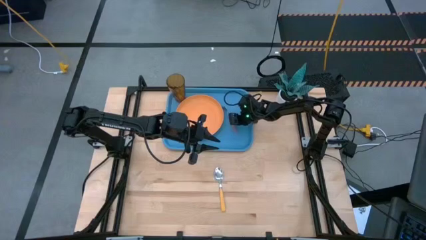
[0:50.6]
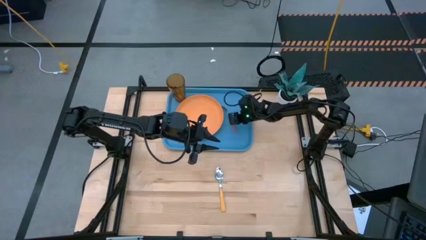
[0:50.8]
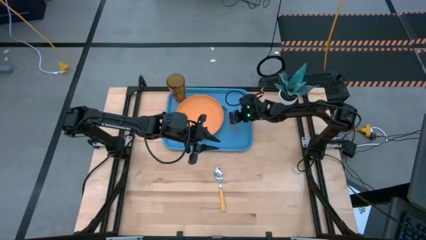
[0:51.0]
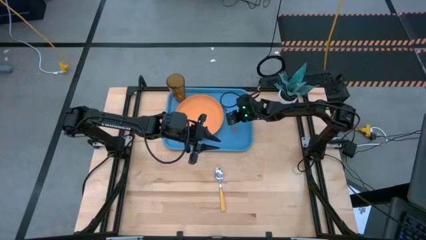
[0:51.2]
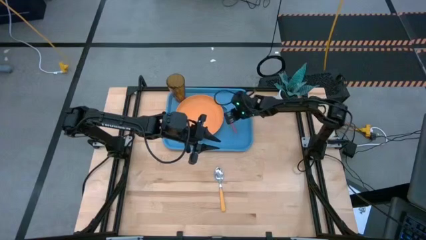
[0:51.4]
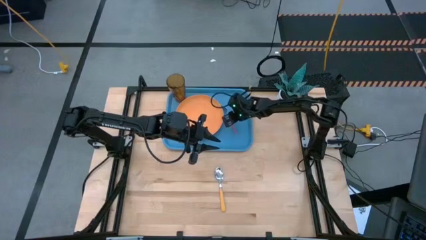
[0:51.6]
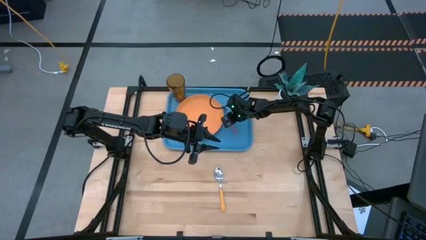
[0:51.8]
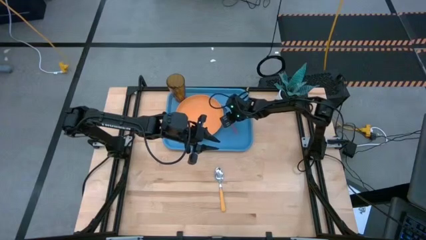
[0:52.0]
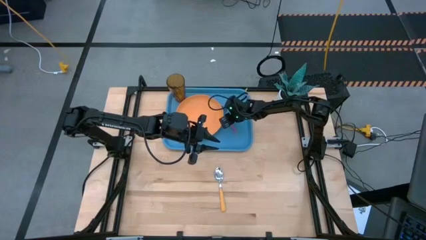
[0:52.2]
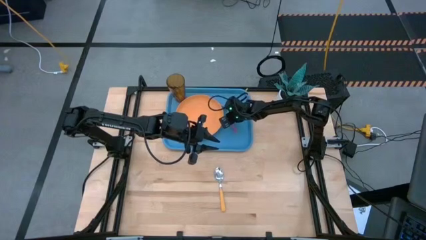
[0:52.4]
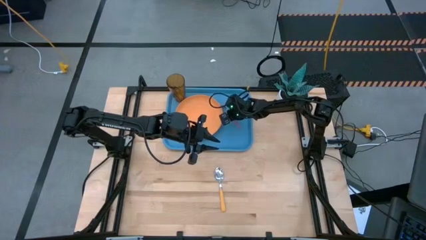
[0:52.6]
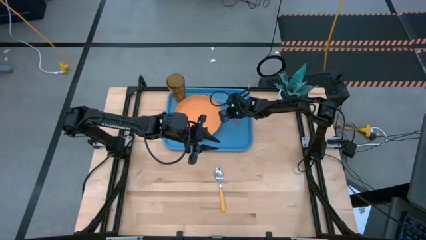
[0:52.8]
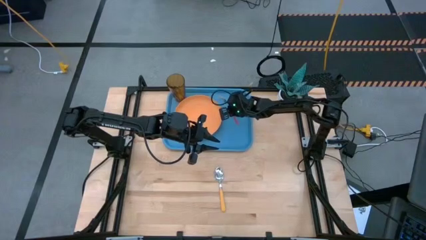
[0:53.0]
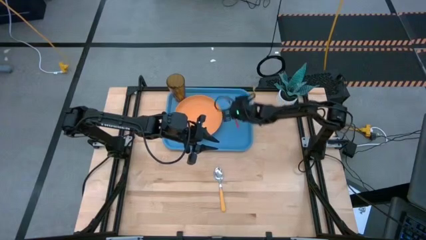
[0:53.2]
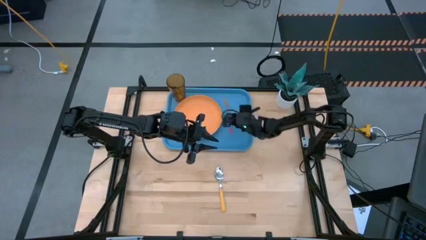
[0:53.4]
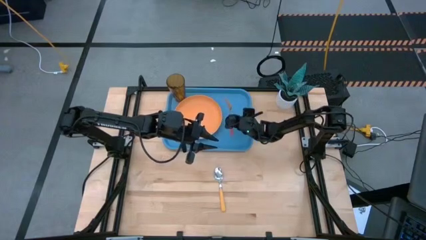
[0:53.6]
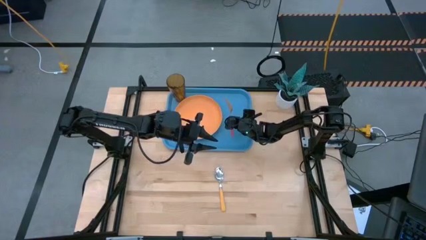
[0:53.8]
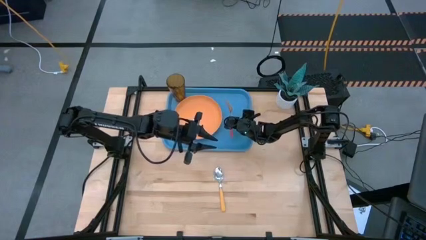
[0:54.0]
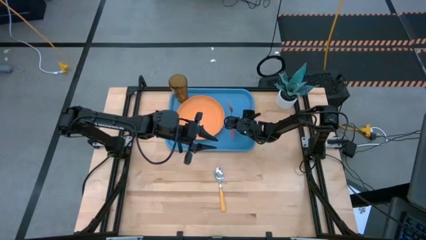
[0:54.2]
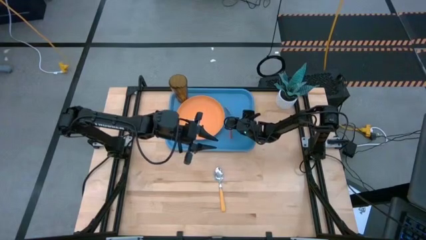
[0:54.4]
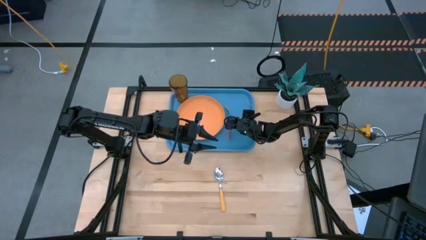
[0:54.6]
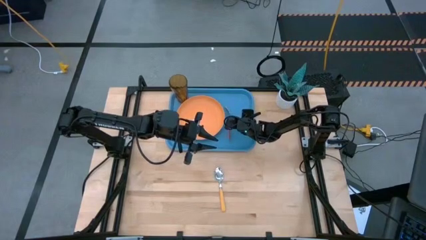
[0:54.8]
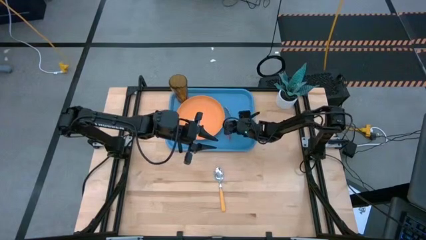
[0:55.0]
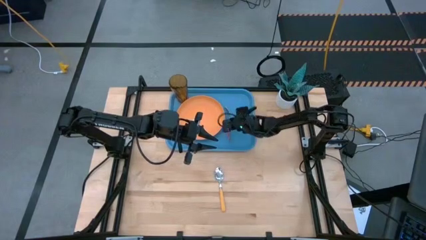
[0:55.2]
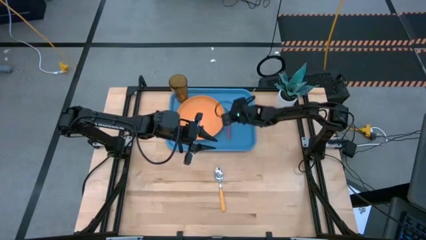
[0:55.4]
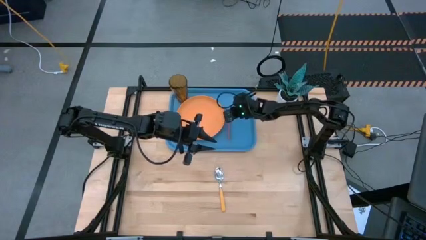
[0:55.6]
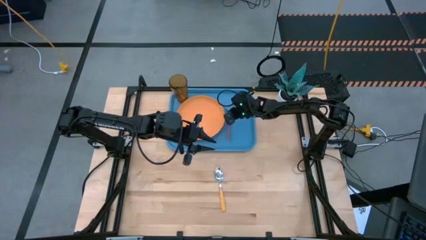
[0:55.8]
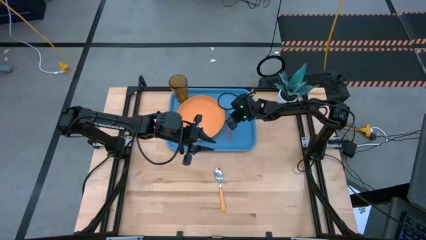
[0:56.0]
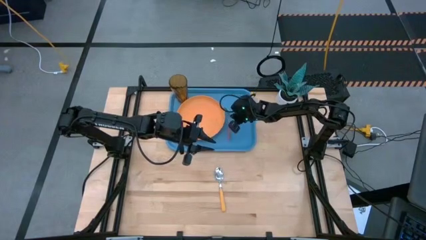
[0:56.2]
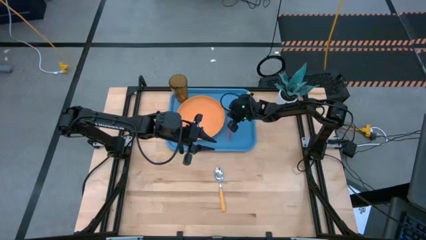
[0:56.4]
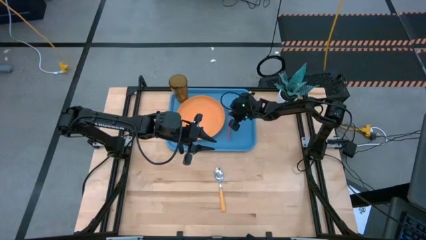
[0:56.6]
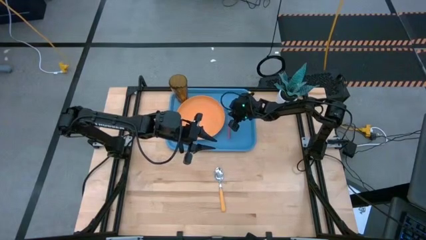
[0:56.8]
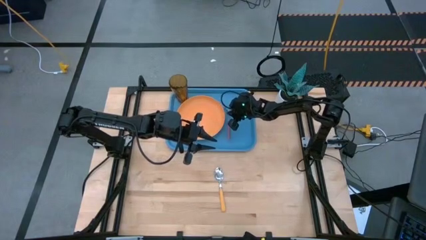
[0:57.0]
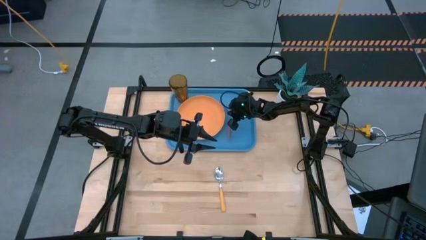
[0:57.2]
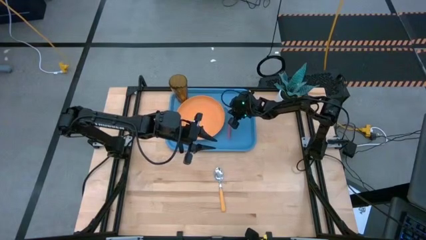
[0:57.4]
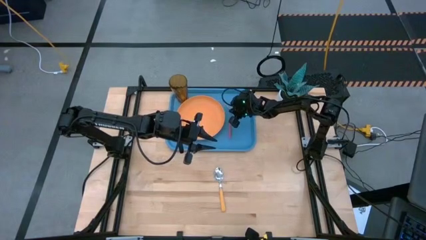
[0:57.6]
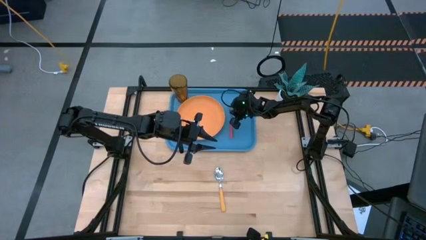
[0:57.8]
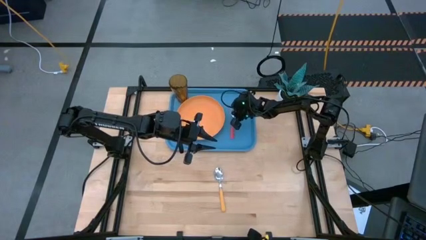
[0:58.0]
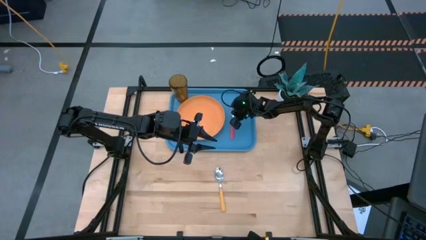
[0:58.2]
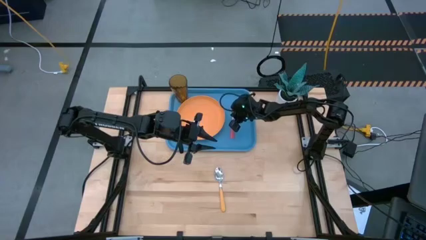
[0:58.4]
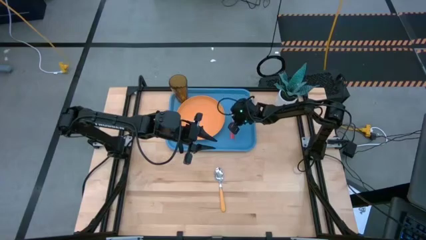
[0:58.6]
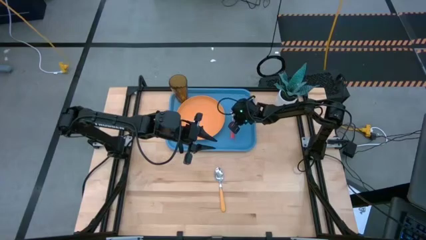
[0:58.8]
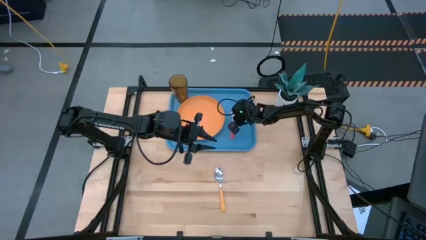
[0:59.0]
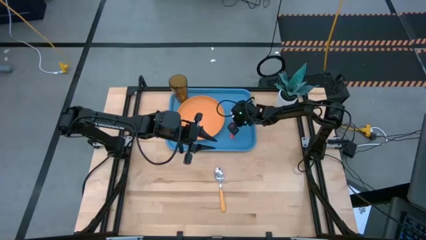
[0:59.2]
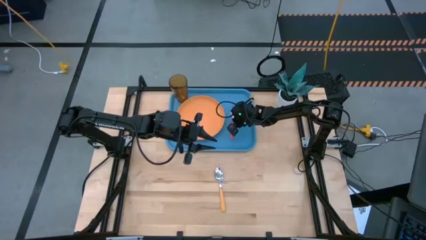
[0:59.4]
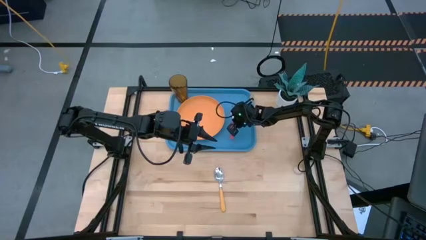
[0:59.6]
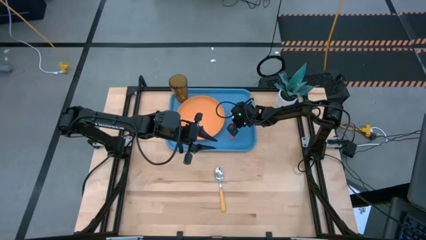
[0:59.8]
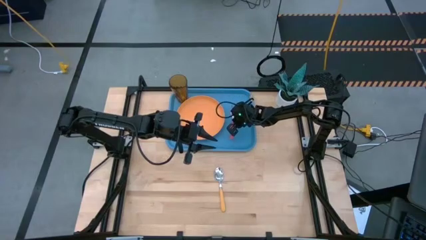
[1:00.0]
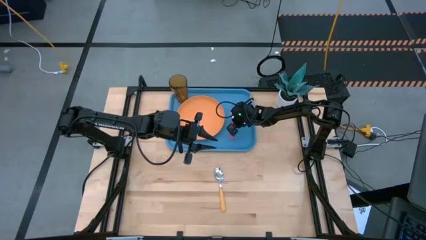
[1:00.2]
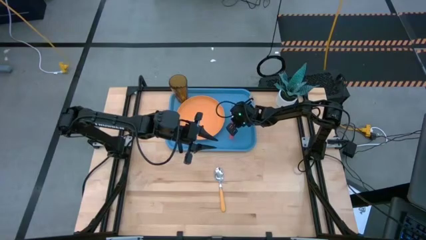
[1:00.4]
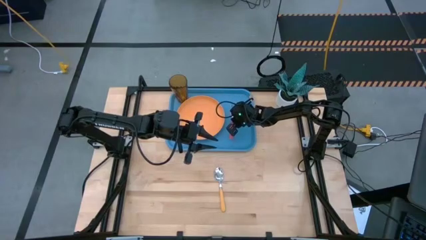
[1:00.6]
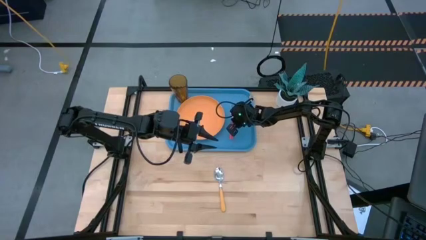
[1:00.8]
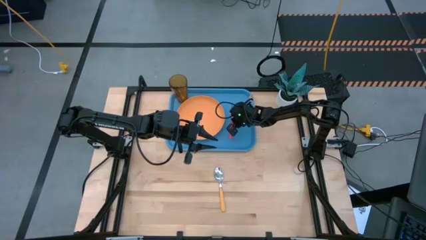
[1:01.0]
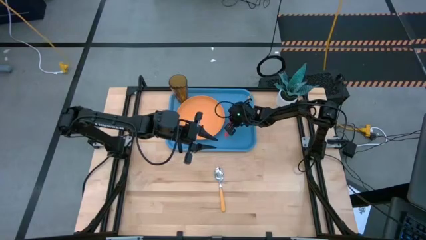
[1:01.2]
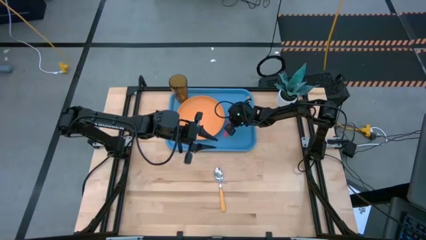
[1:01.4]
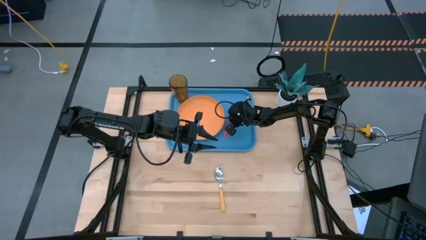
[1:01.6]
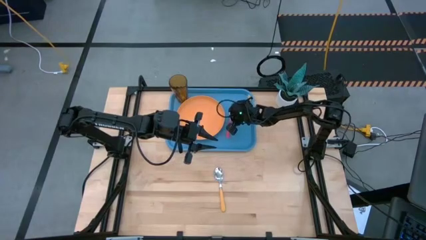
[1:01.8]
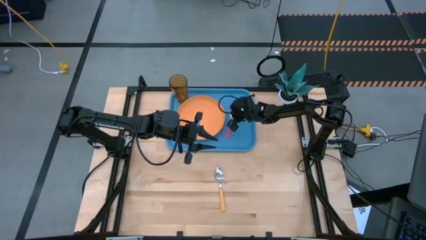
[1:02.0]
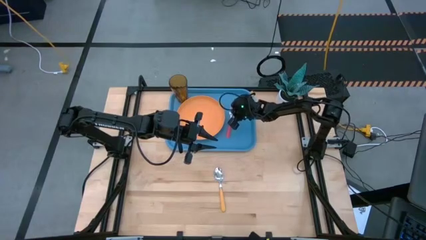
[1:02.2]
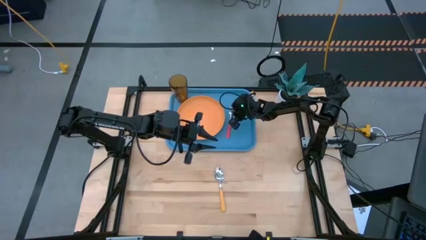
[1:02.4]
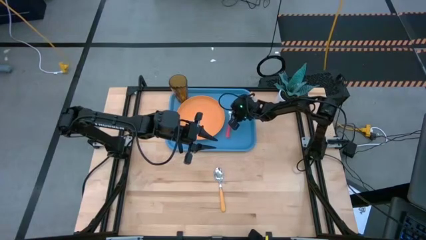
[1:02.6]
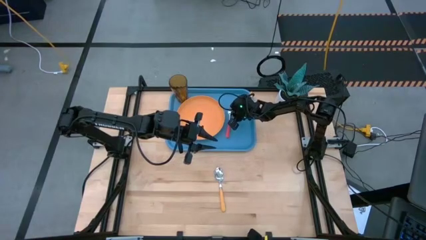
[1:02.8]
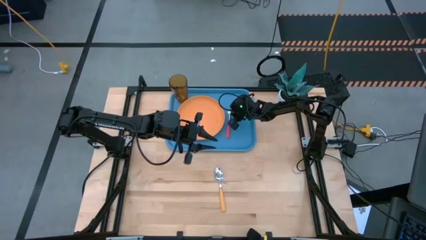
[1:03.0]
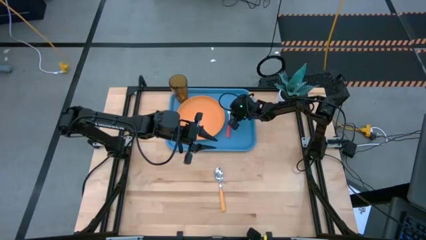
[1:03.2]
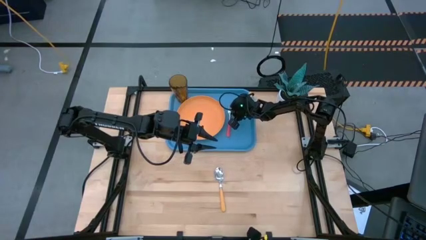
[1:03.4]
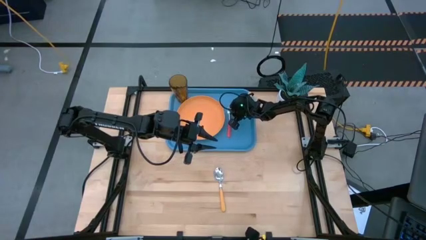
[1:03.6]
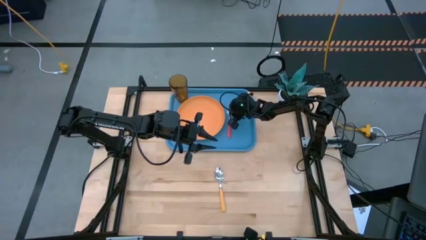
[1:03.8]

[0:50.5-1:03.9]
Task: Pick and place plate/cup/fork/spoon on tray
Put the pink fork on the right side of the orange plate
